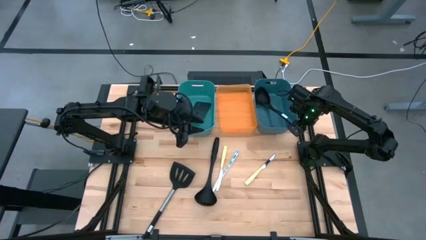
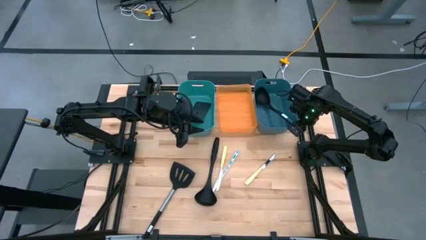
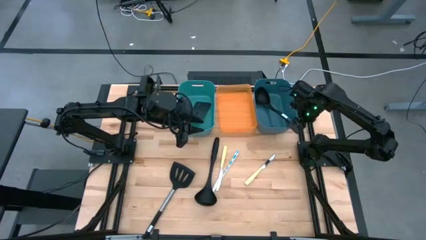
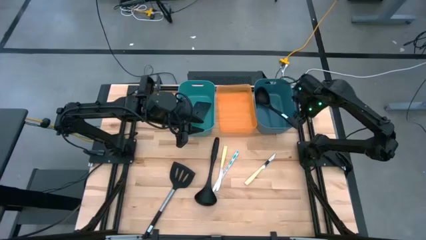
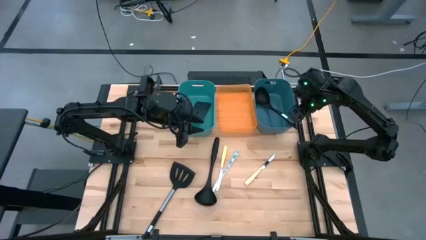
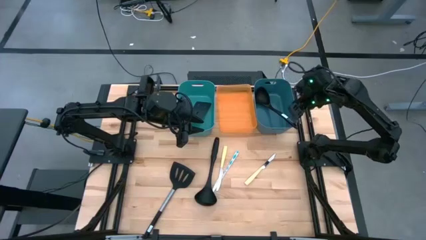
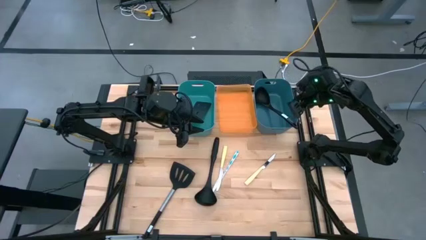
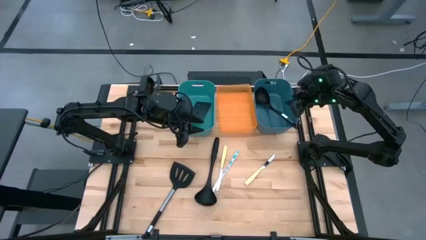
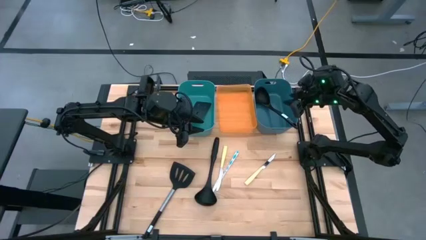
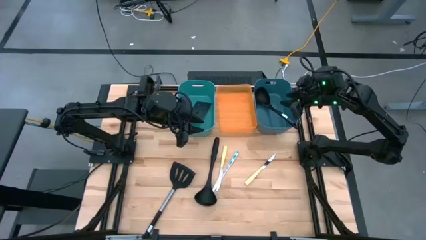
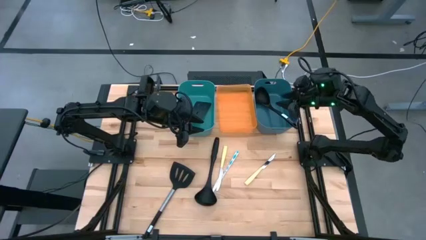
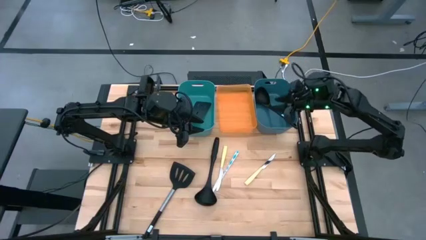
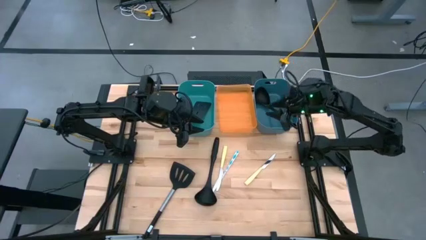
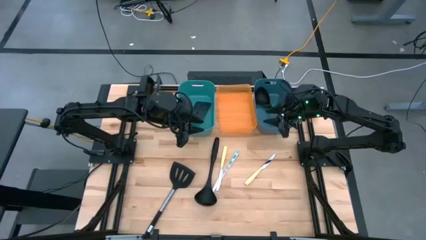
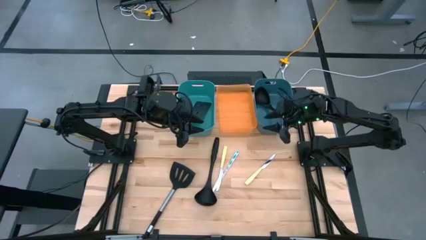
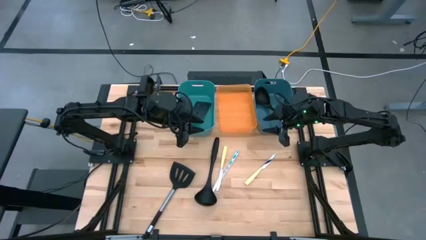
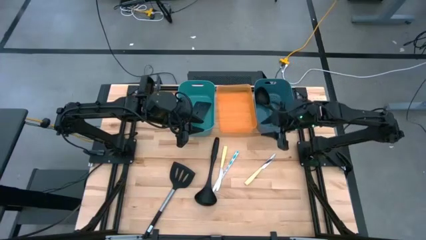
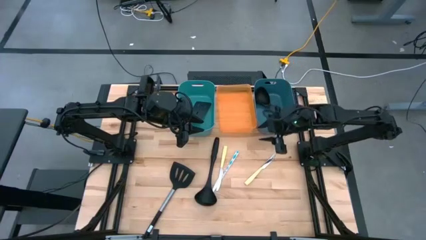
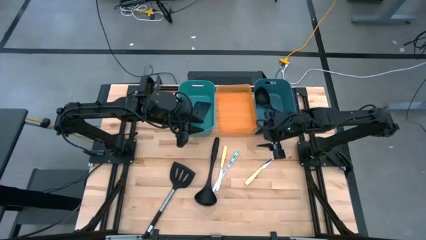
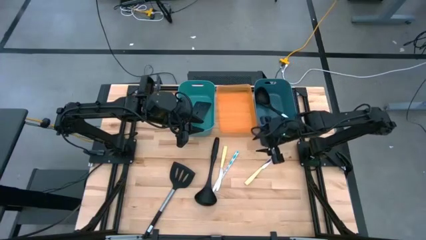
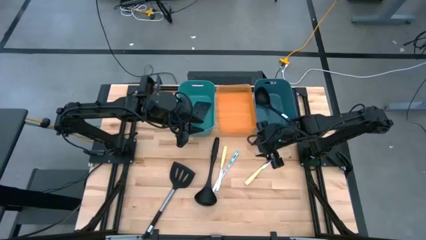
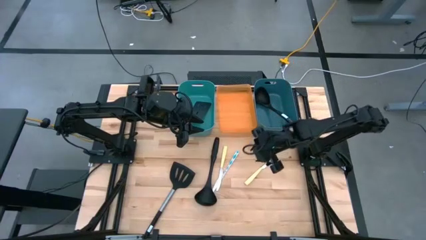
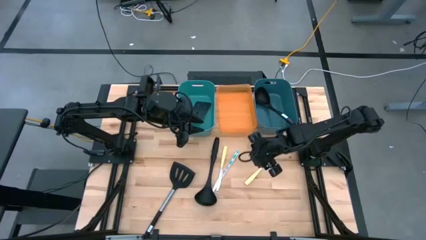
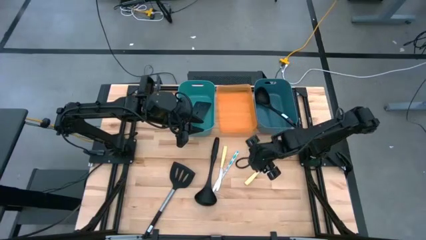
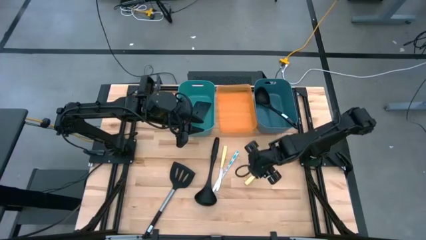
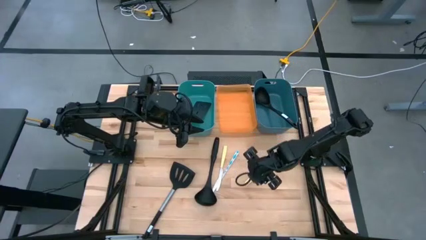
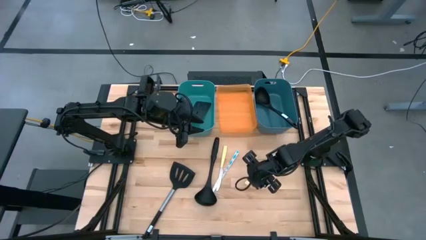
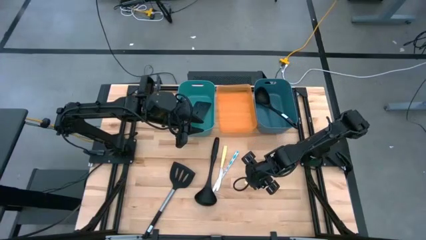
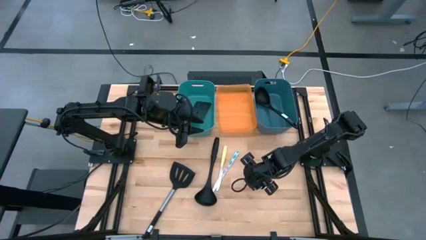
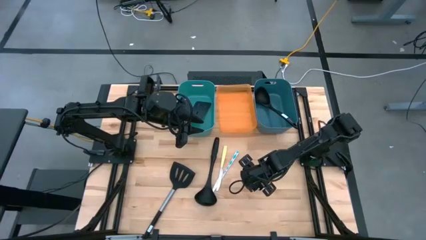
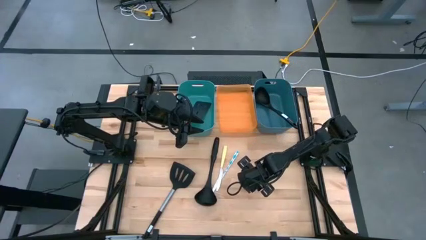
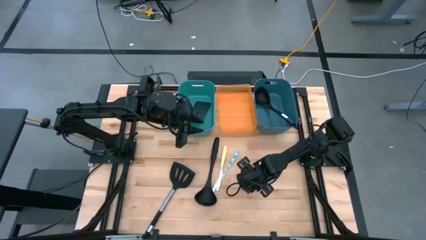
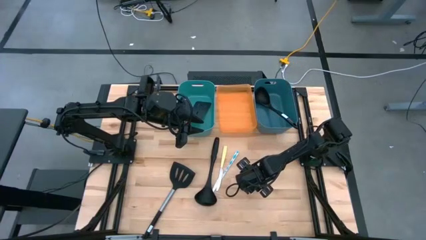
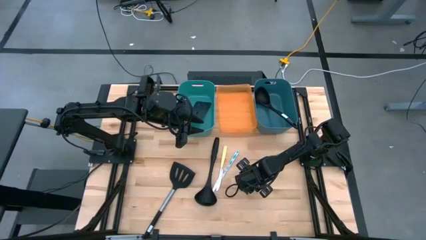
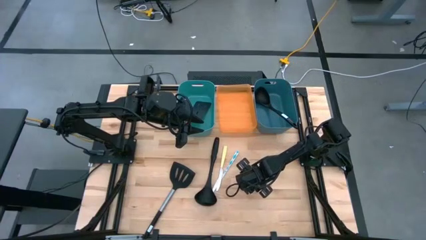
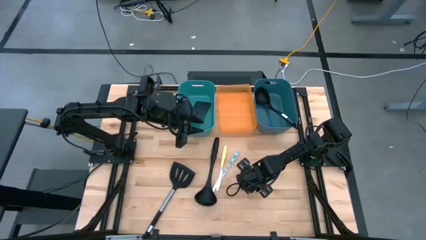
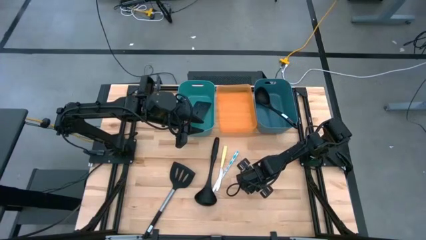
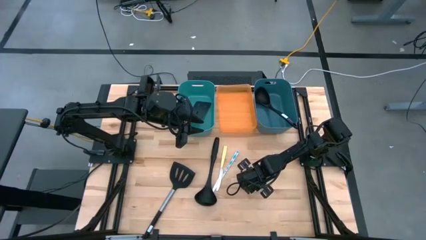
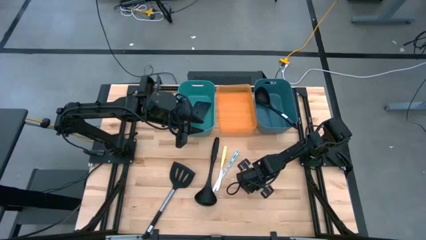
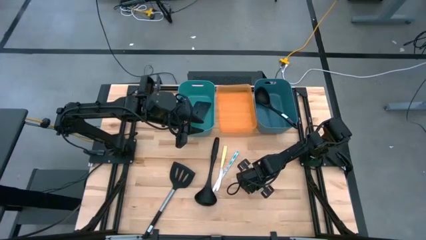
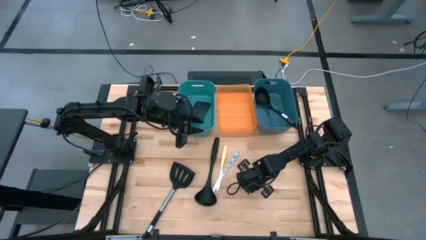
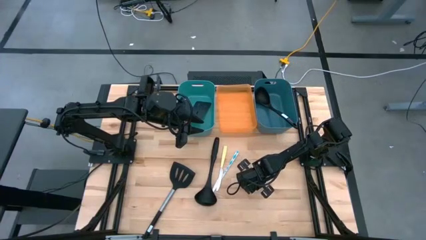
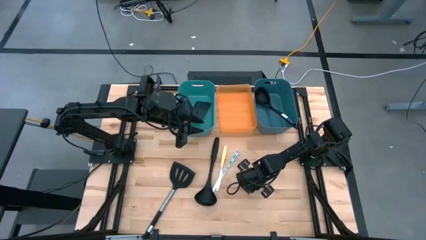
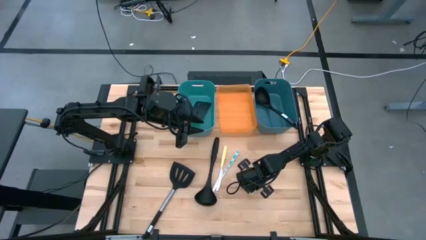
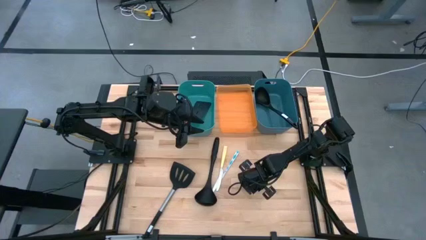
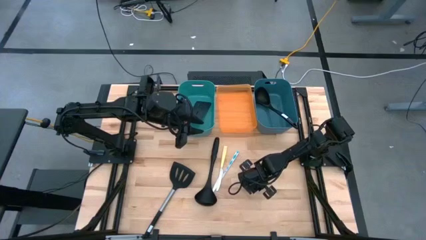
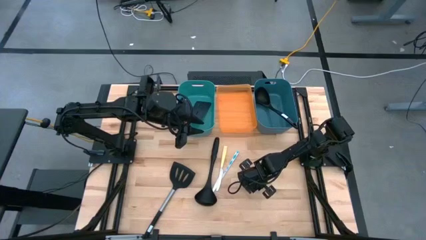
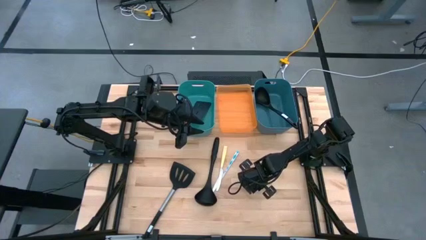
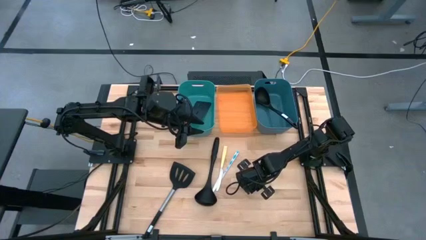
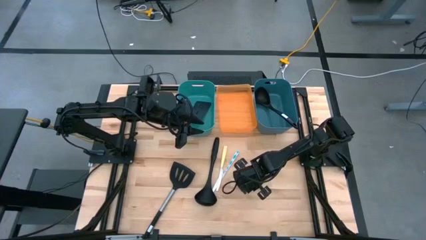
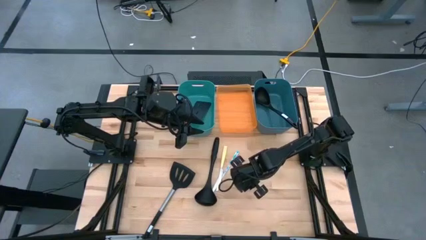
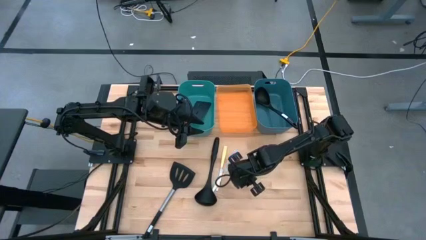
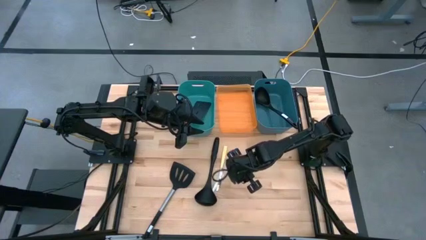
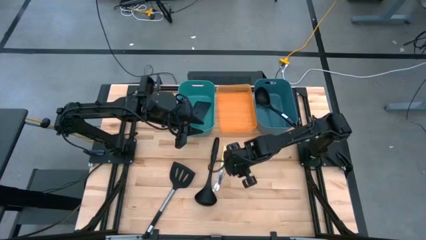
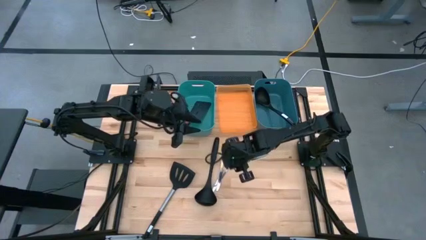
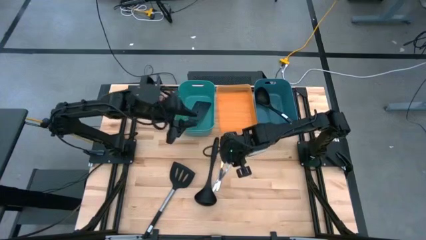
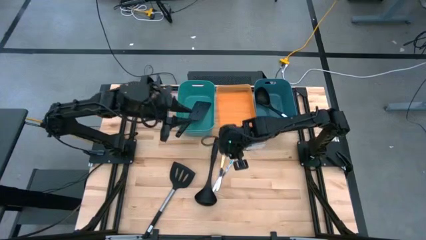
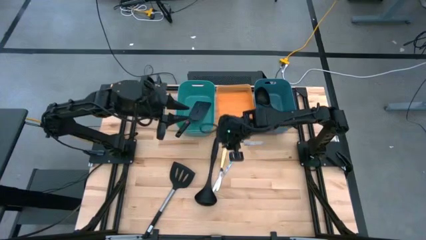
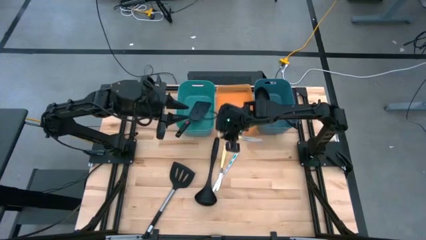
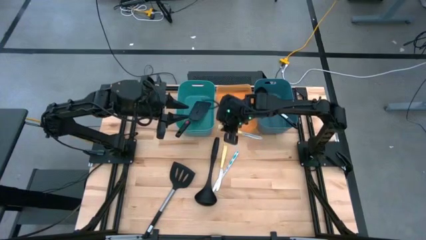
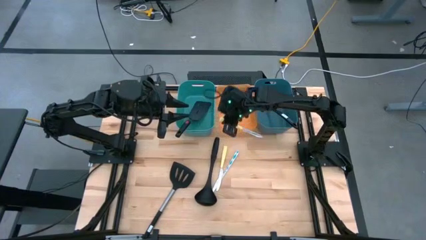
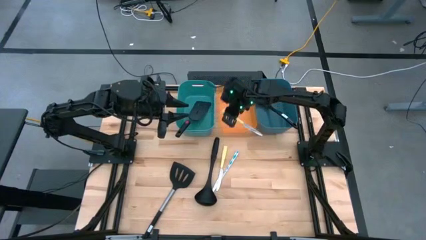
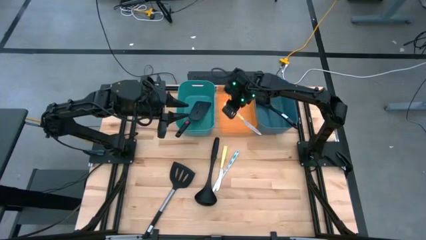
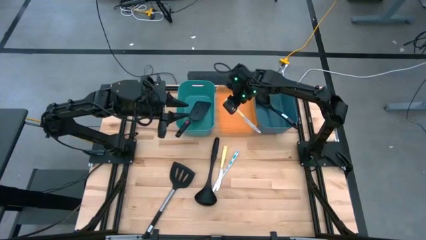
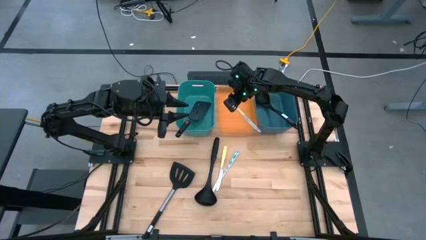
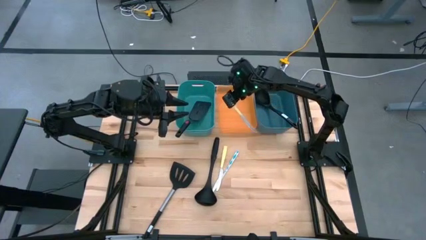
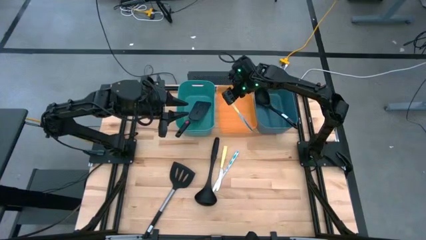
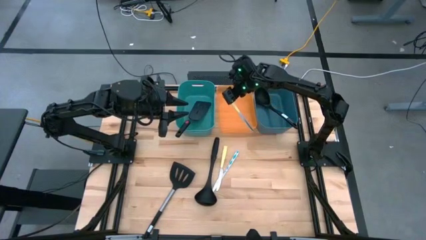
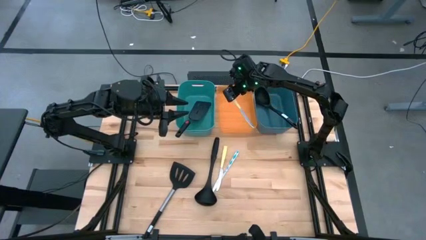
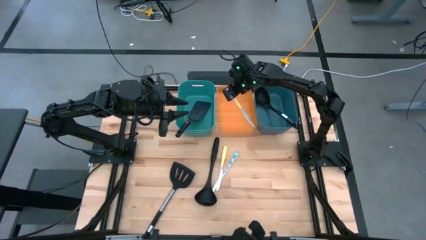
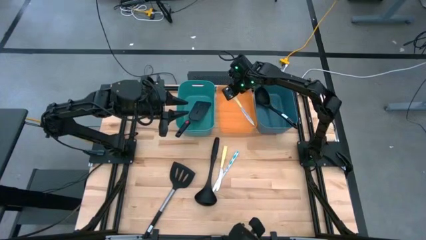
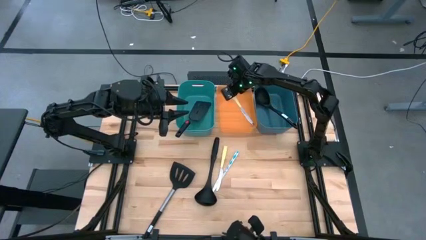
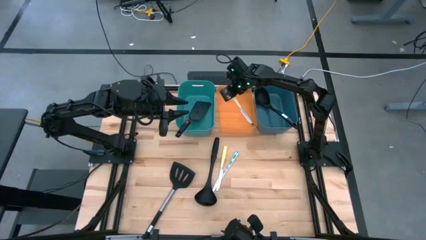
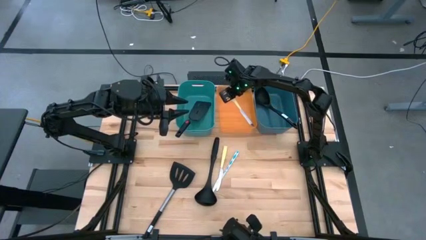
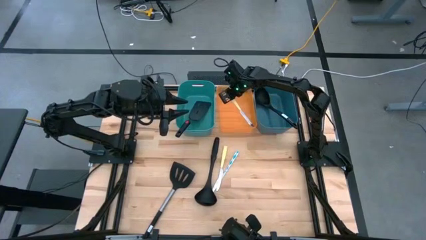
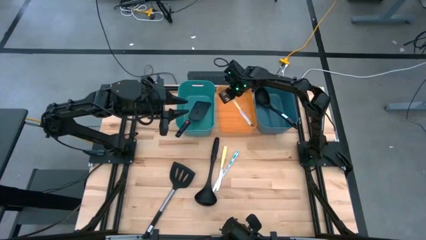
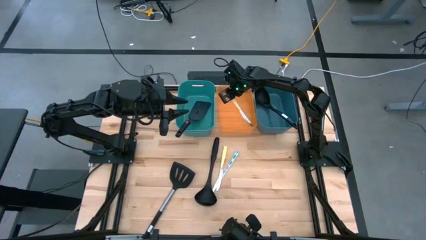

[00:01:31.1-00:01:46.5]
Task: Pick & Place Kitchen Items
Put the right yellow table knife into the orange bin
